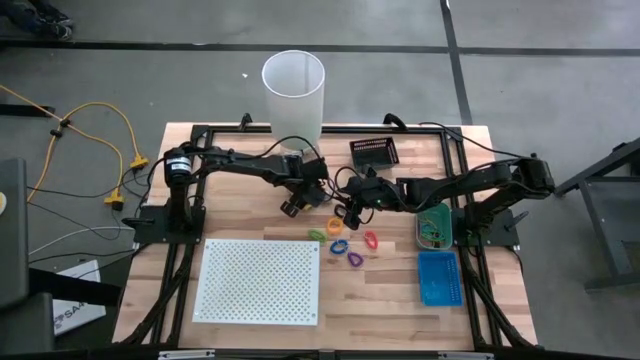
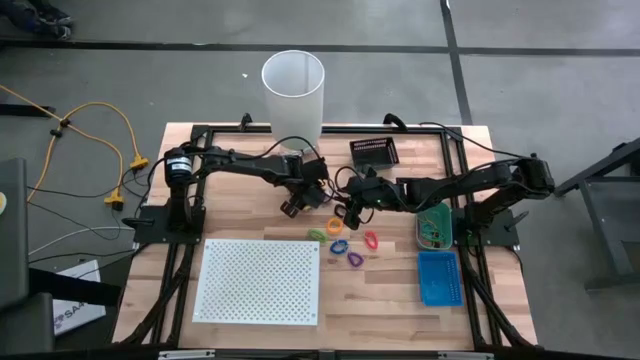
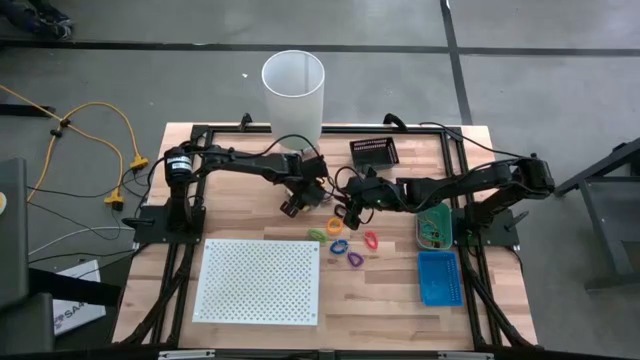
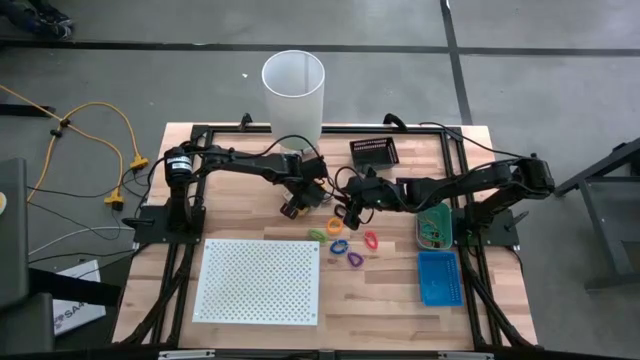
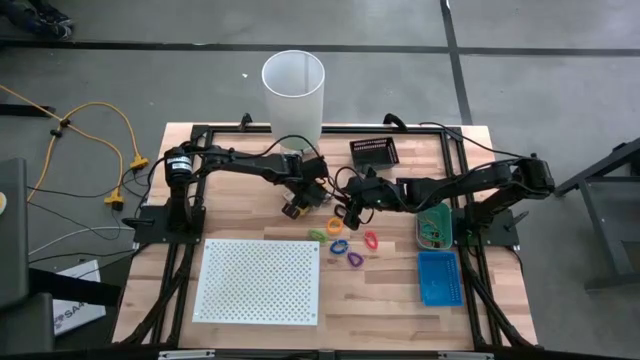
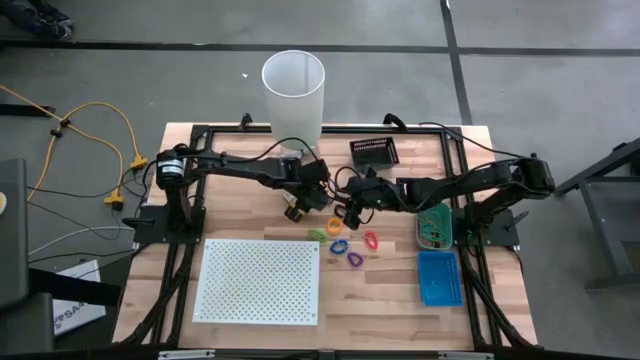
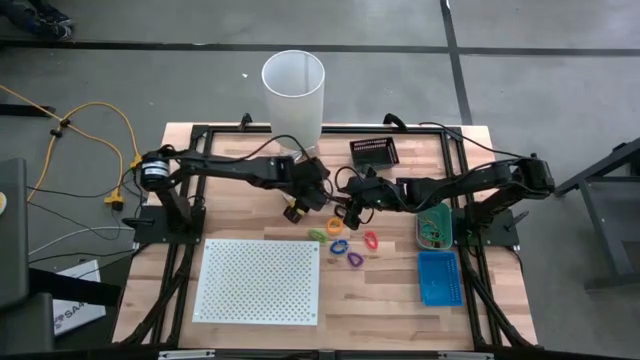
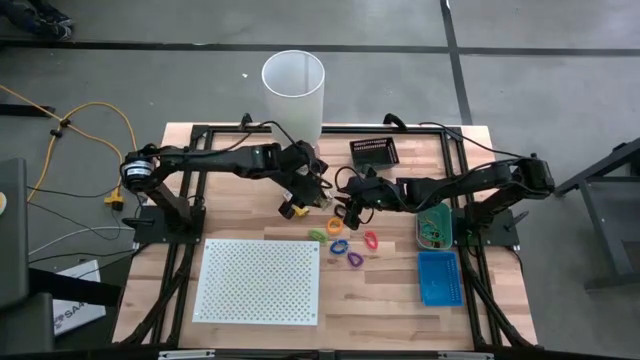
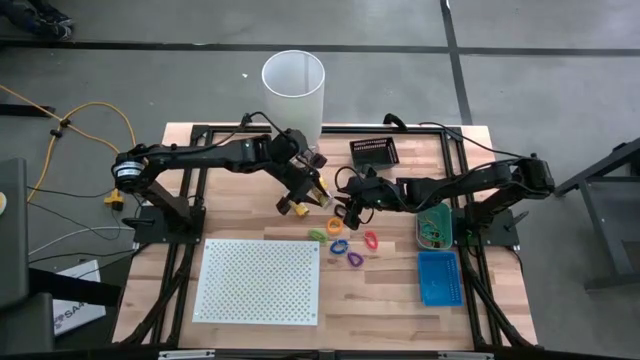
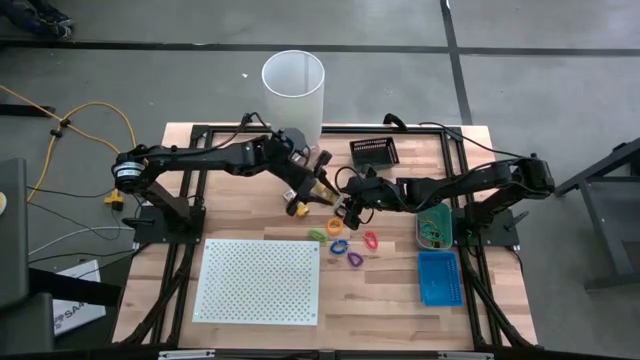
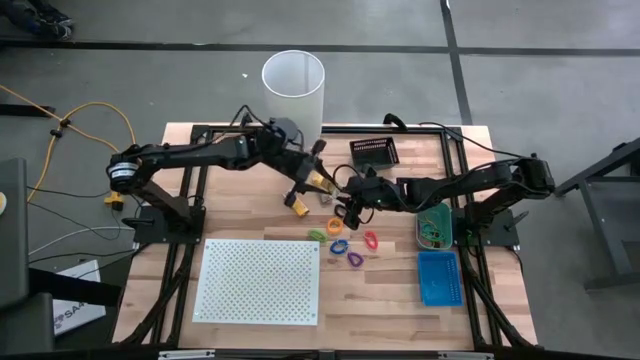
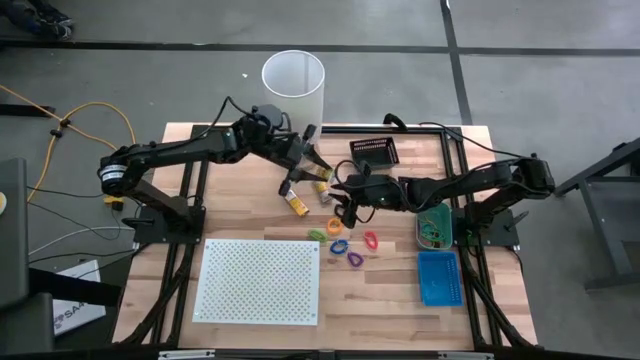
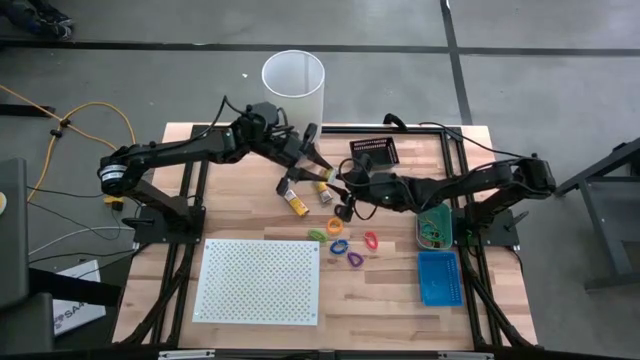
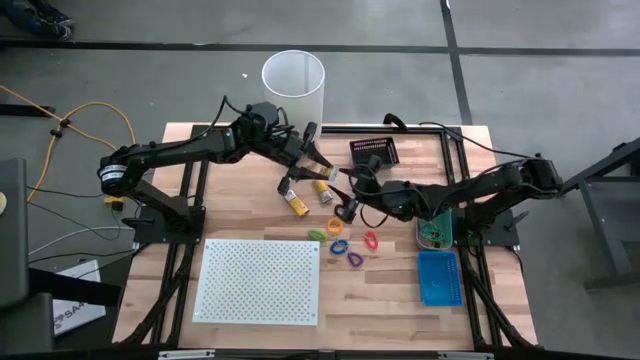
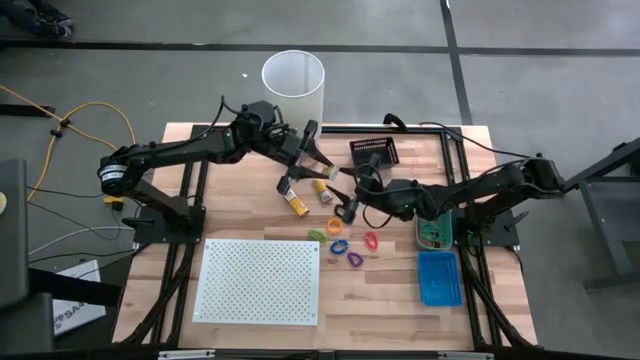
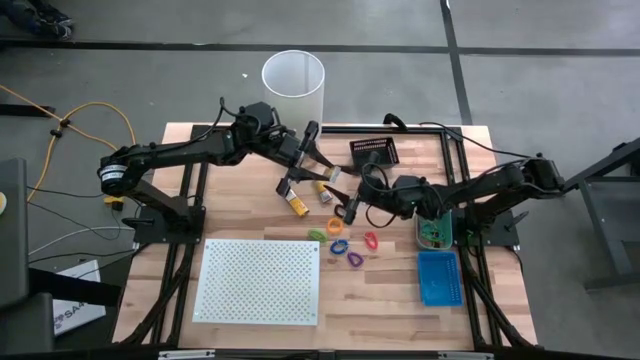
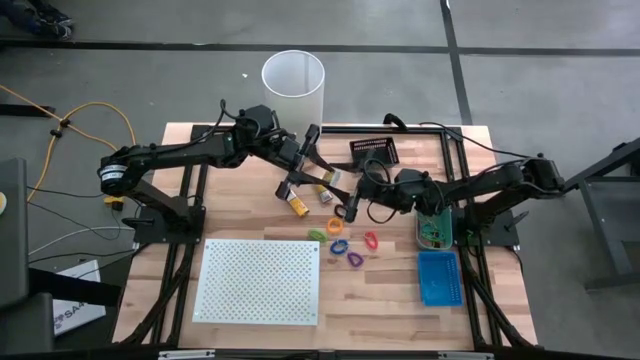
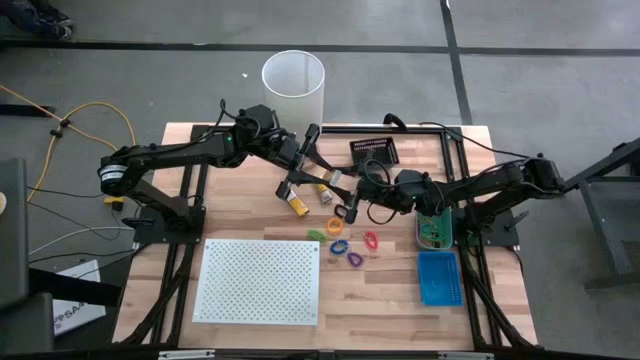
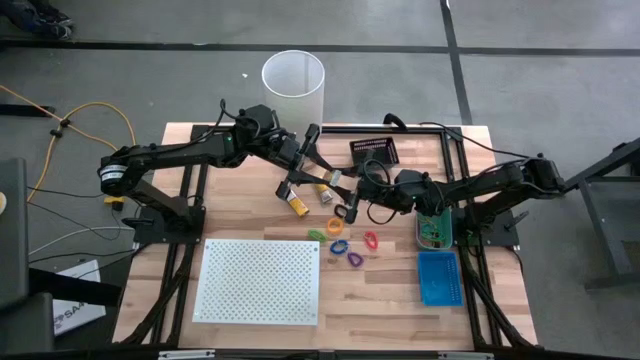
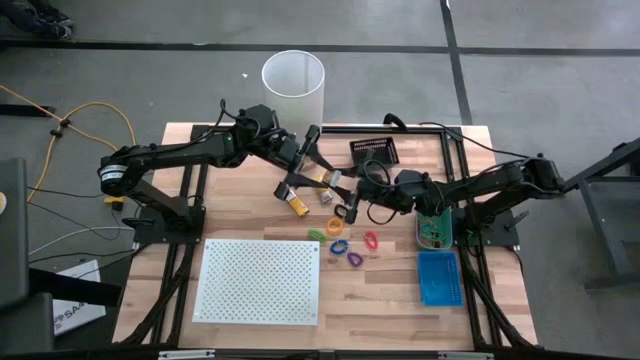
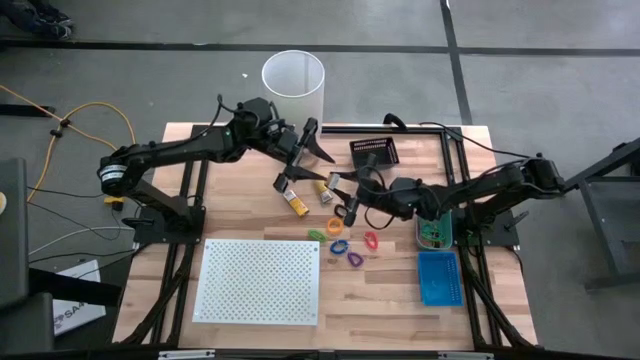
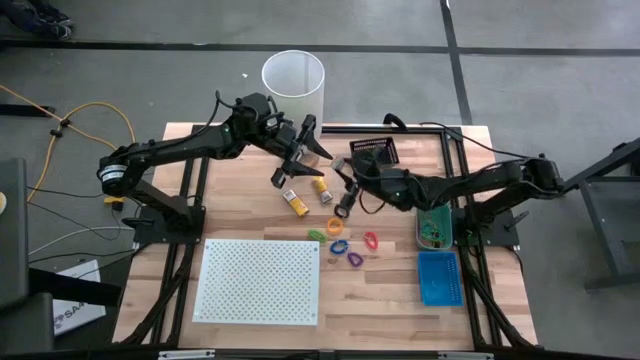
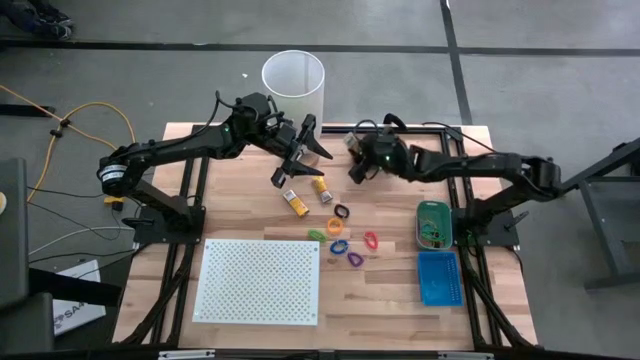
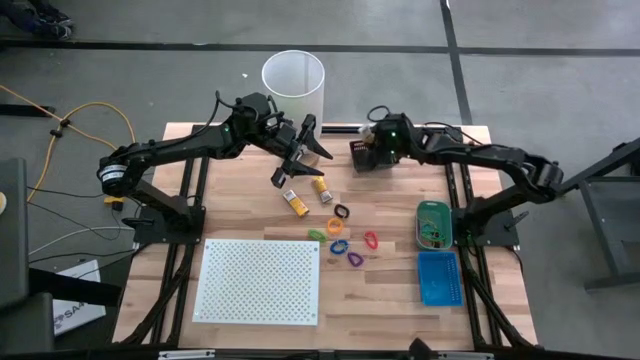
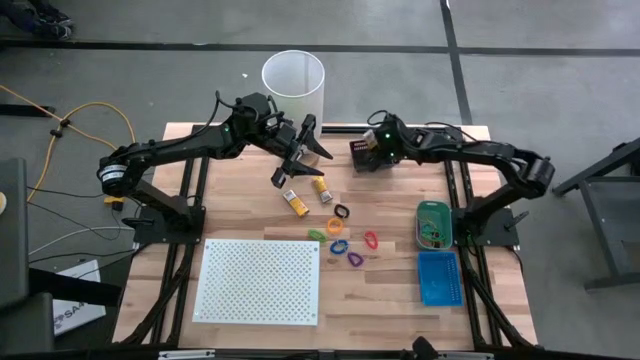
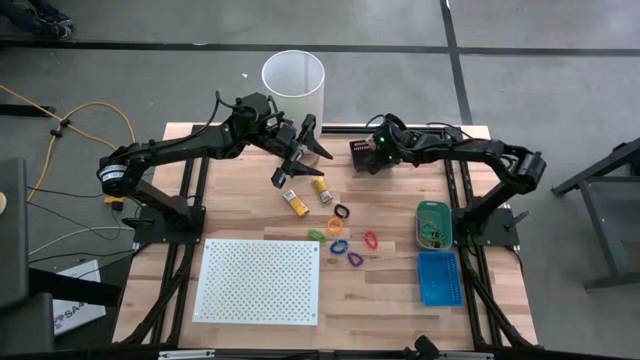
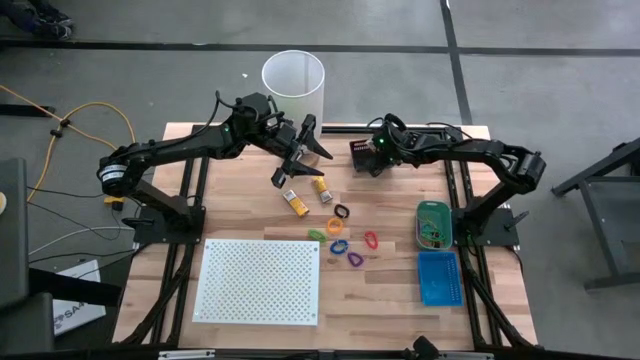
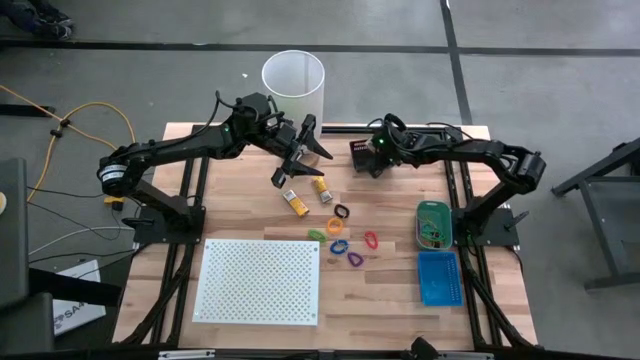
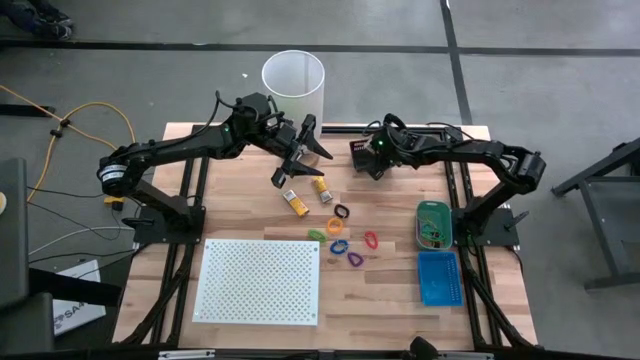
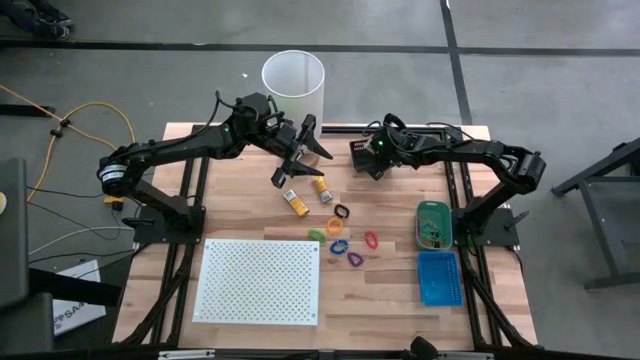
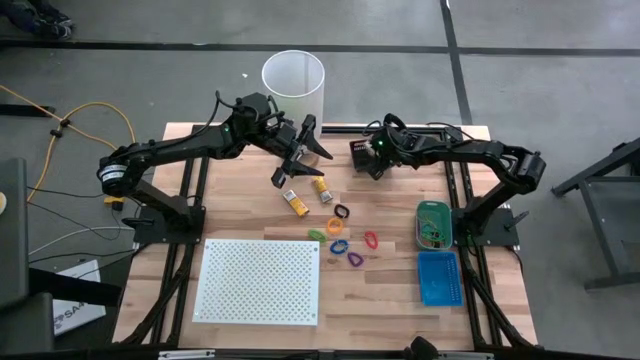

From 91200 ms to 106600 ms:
Task: Pick & Place Office Desk Supplies
Put the middle yellow crayon box into the black bin

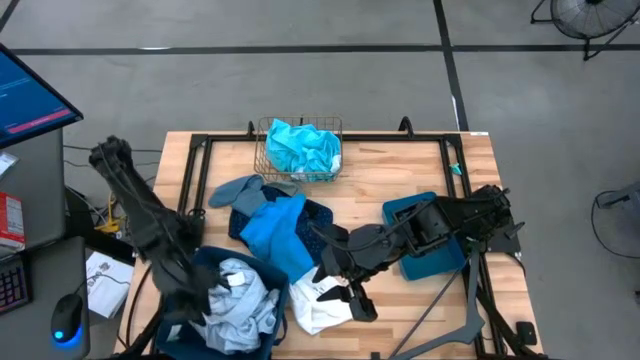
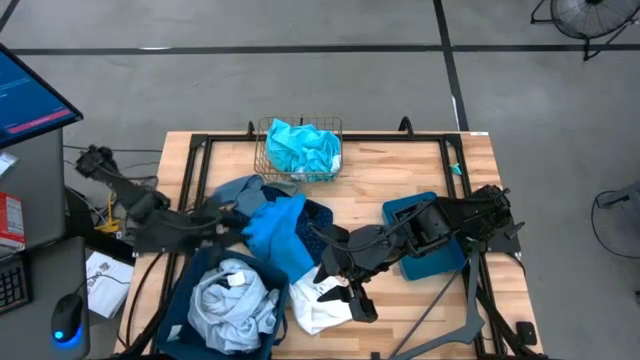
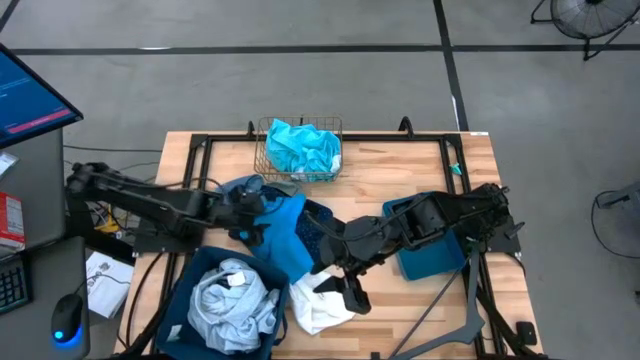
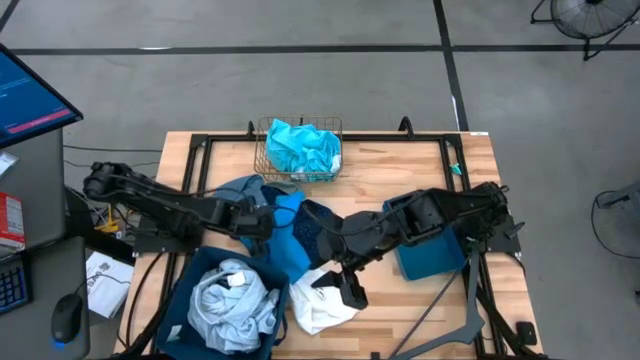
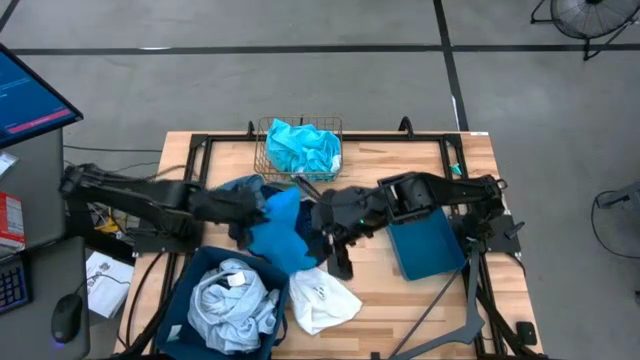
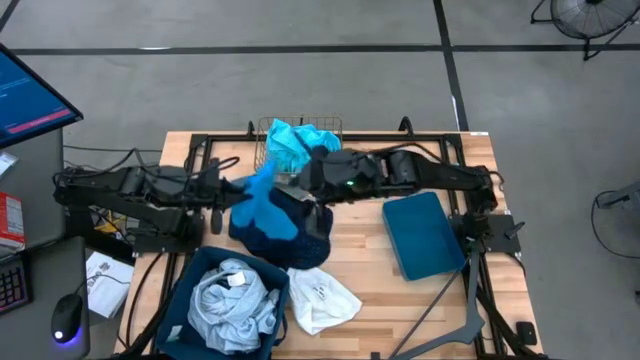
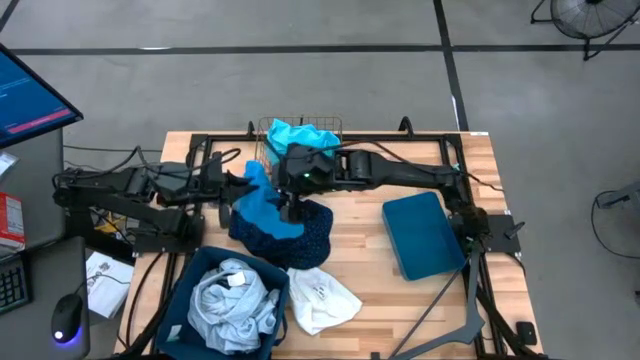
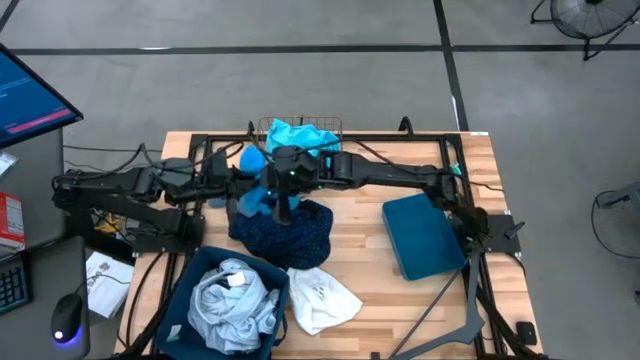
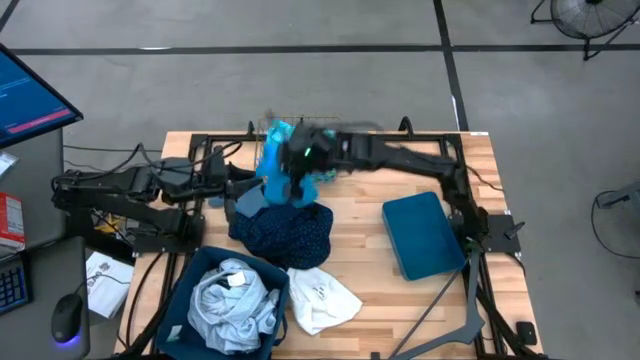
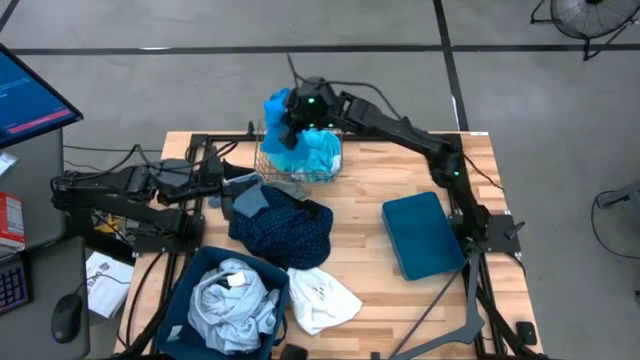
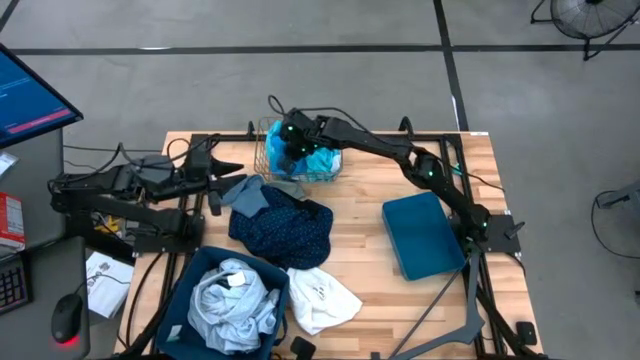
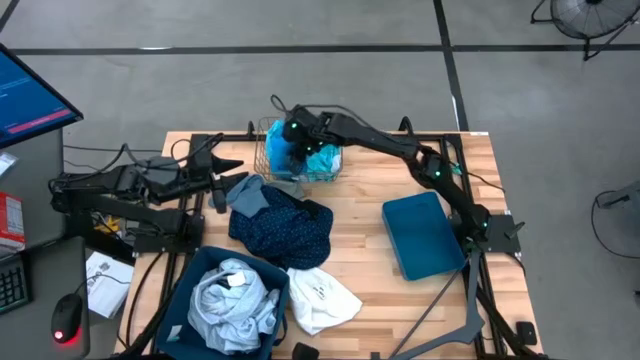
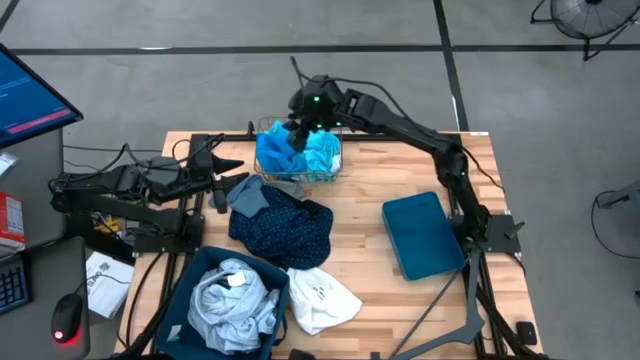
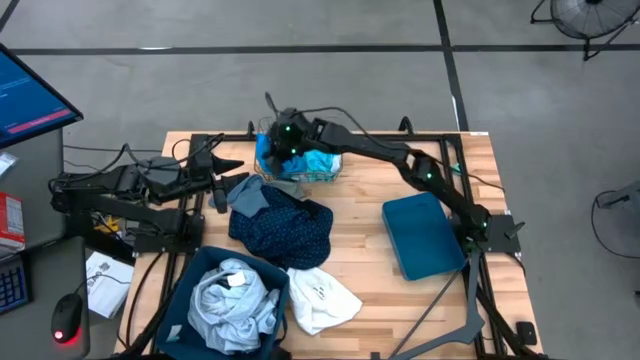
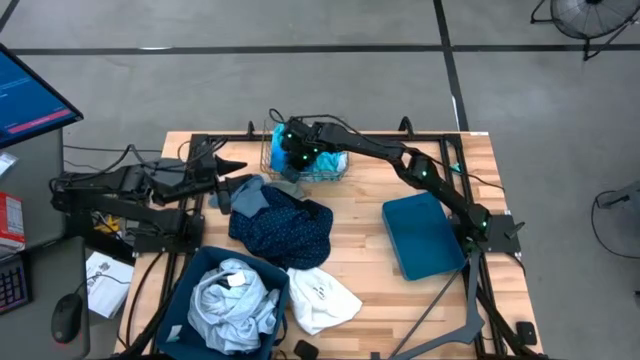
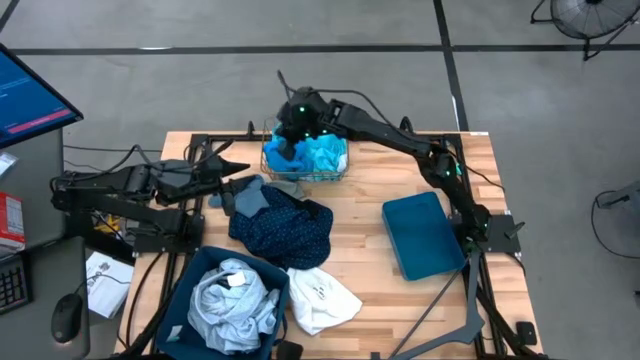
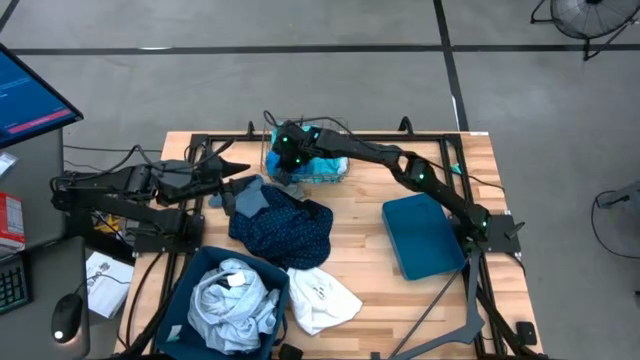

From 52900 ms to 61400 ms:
Task: Pick & Place Cloths
Put the dark blue shorts into the gold wire basket
